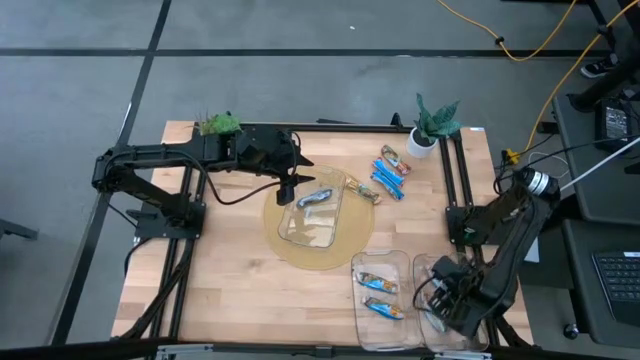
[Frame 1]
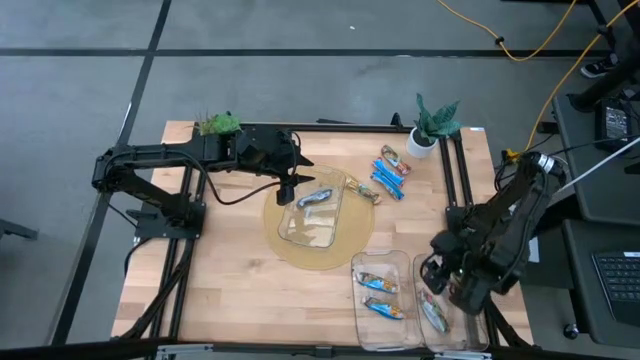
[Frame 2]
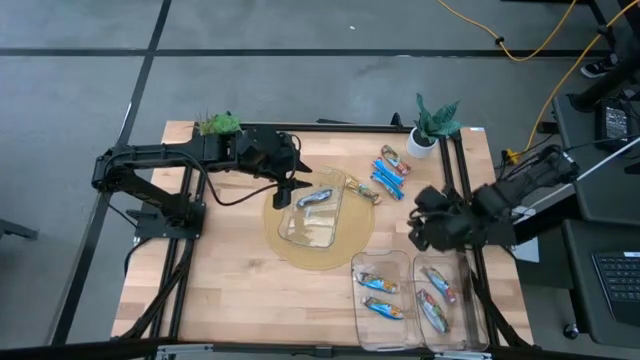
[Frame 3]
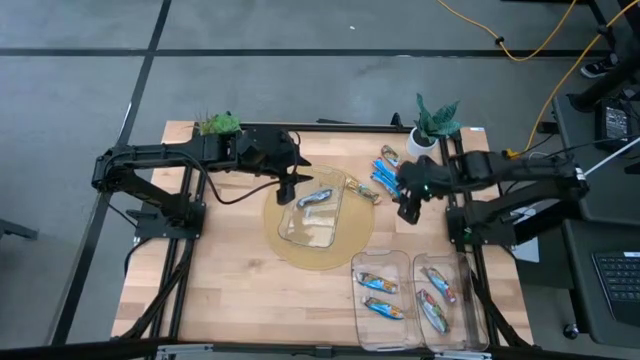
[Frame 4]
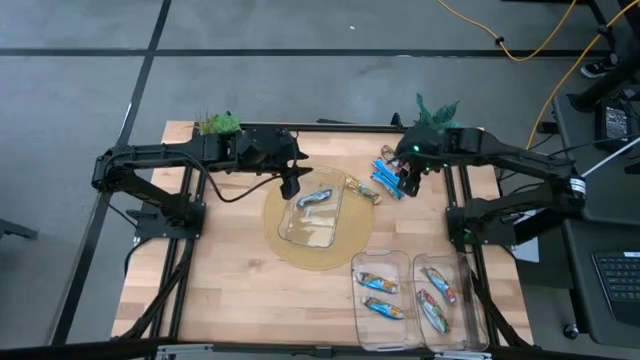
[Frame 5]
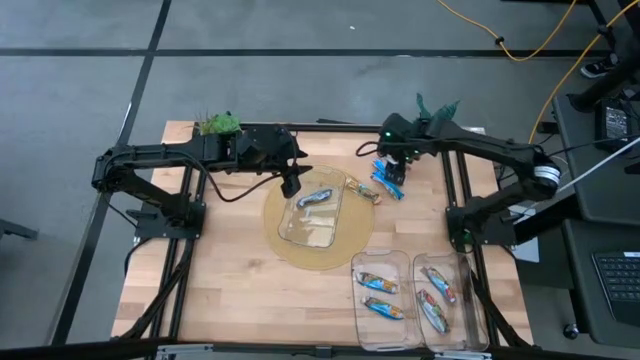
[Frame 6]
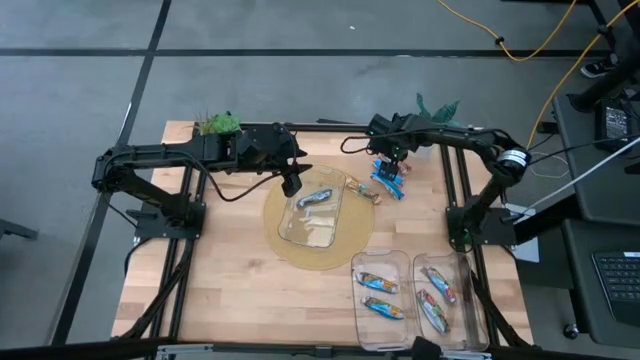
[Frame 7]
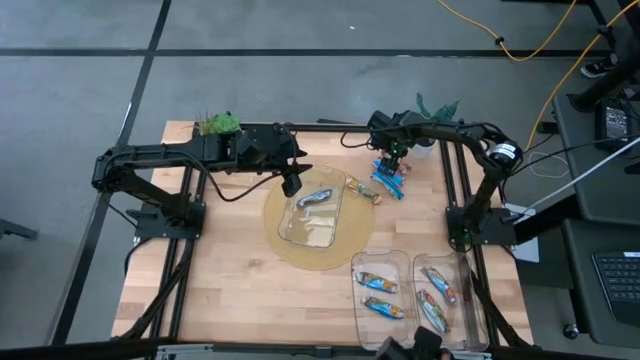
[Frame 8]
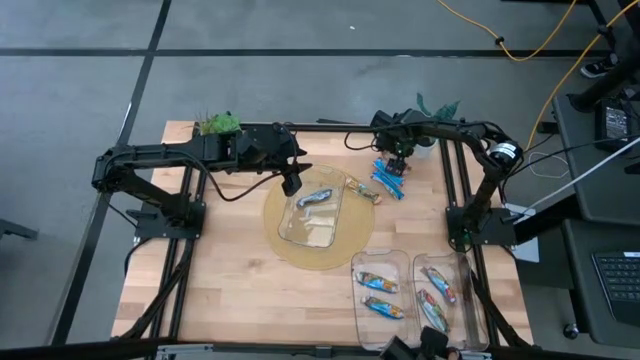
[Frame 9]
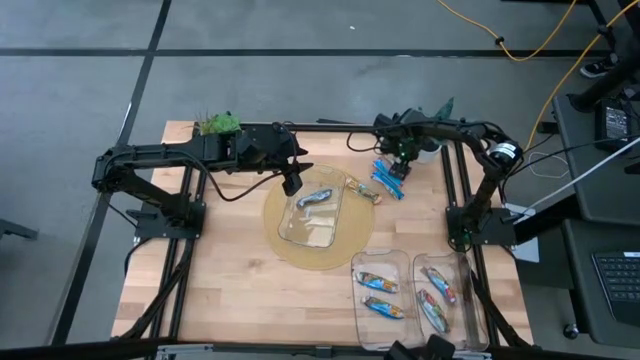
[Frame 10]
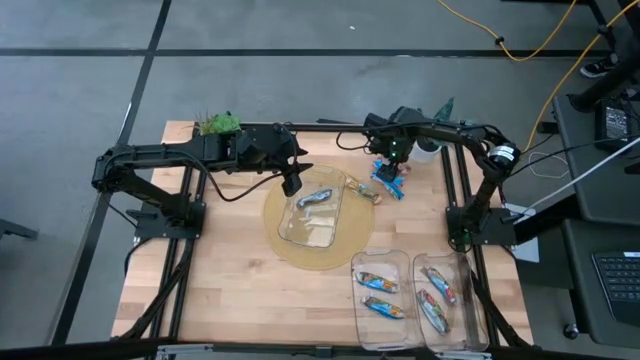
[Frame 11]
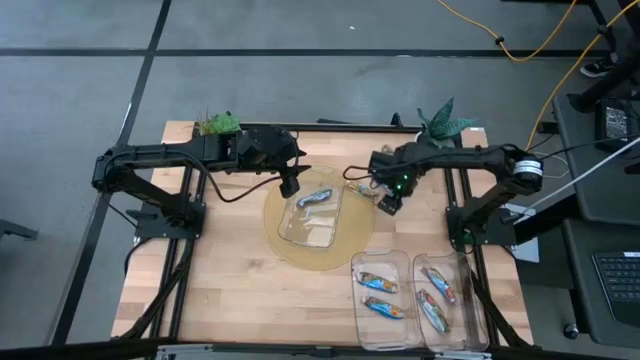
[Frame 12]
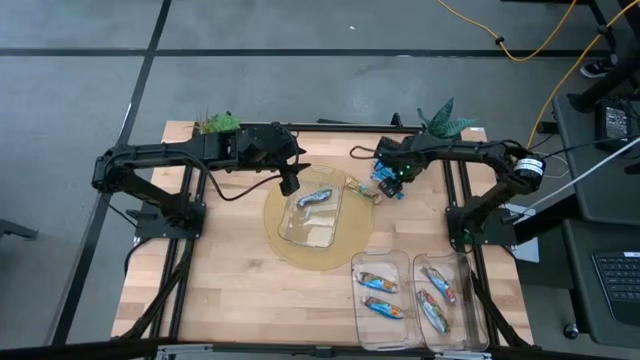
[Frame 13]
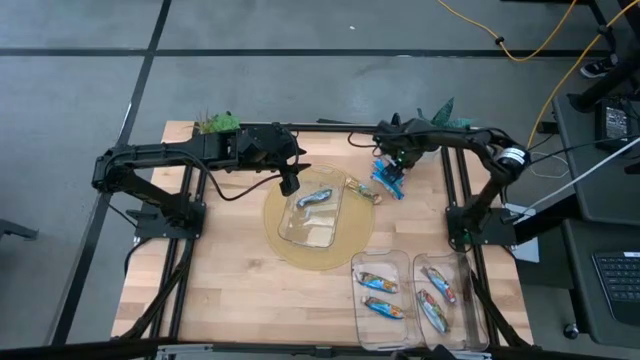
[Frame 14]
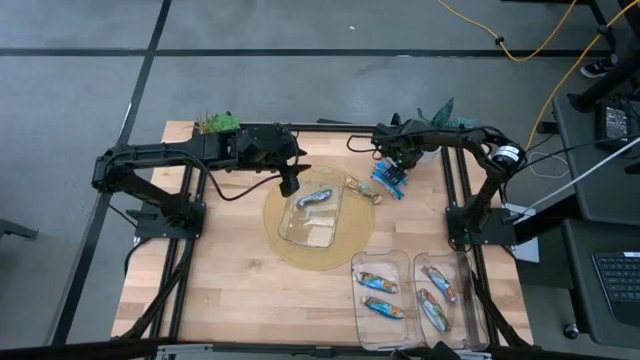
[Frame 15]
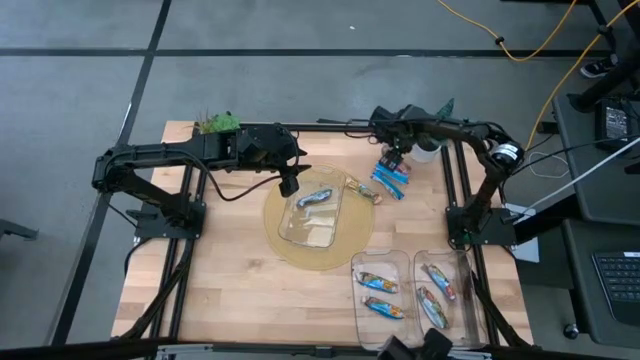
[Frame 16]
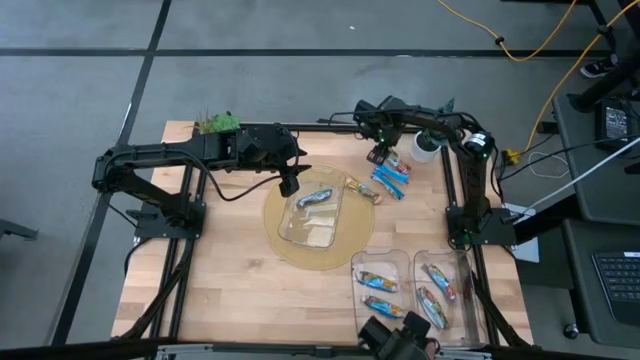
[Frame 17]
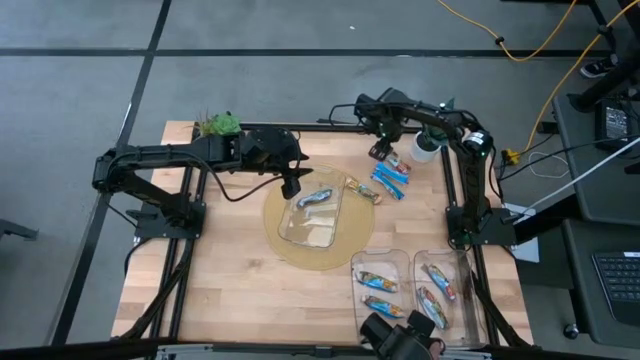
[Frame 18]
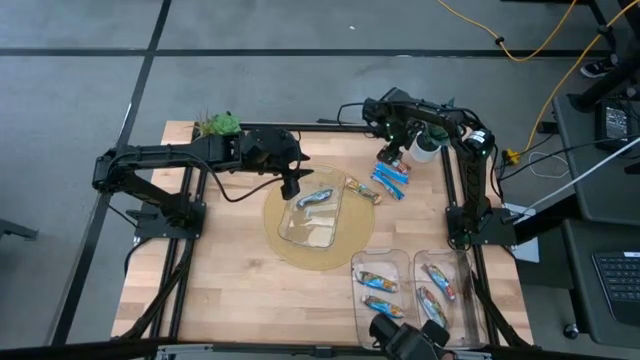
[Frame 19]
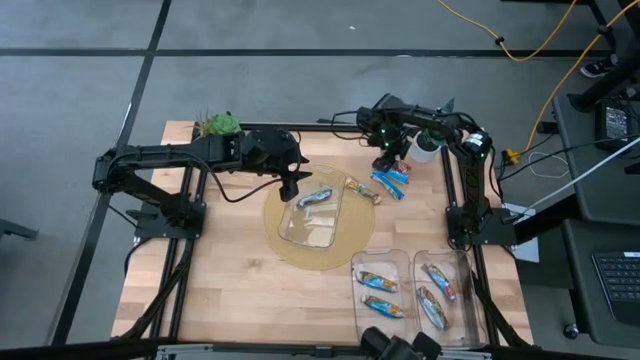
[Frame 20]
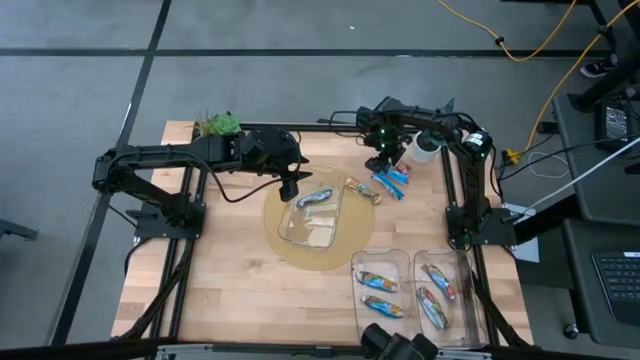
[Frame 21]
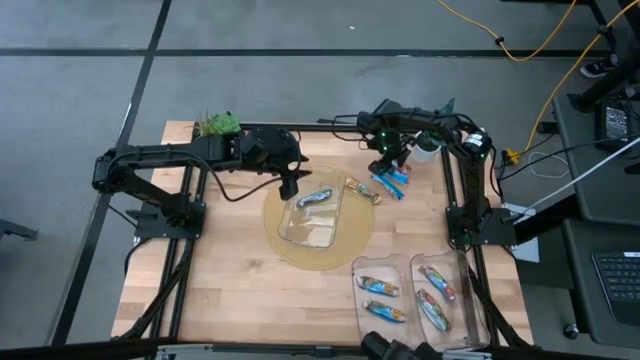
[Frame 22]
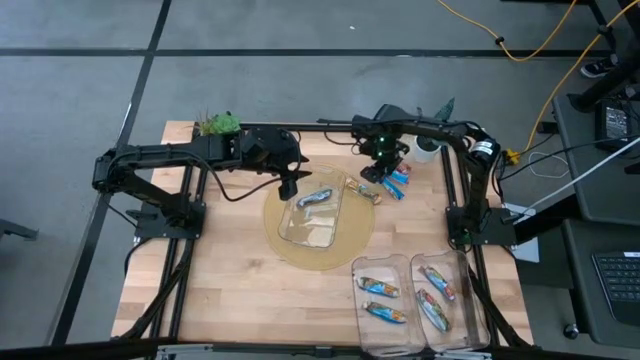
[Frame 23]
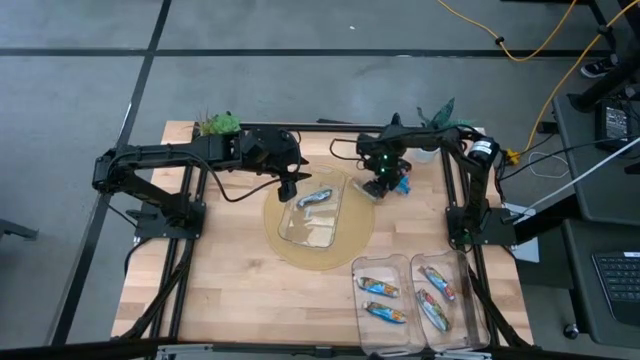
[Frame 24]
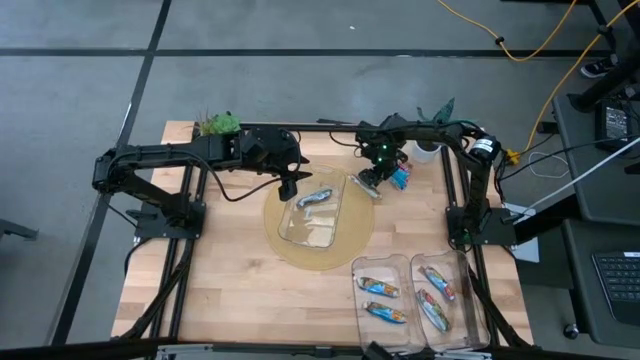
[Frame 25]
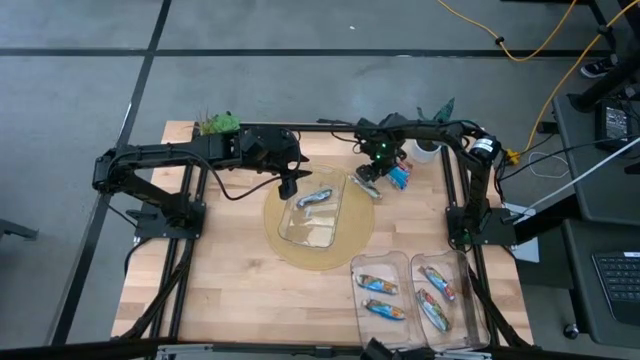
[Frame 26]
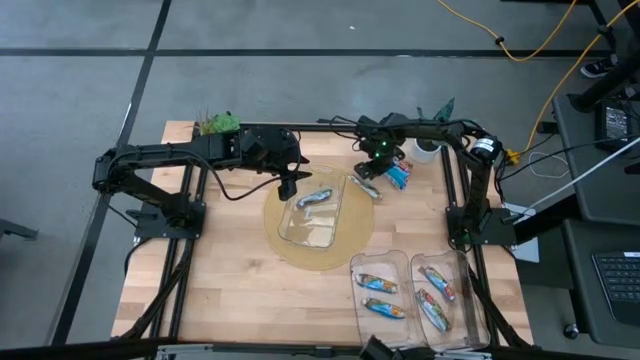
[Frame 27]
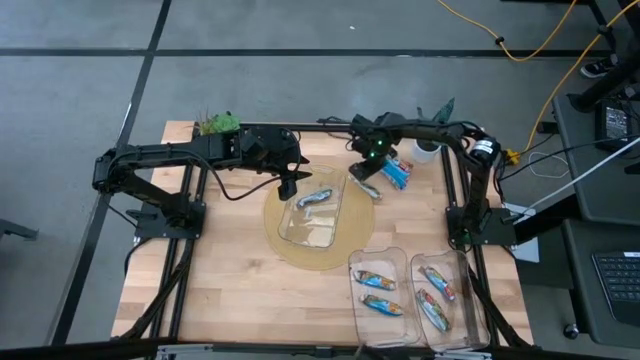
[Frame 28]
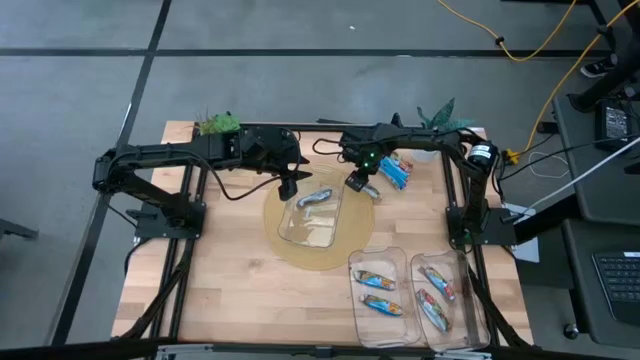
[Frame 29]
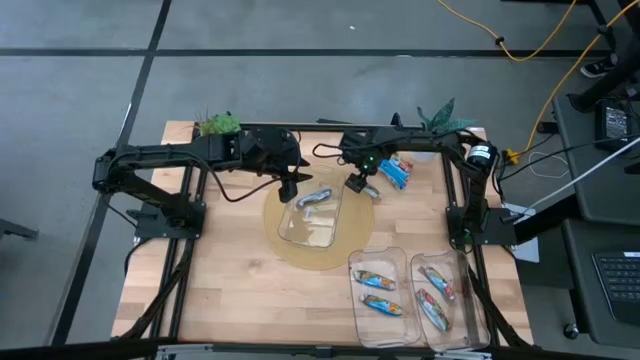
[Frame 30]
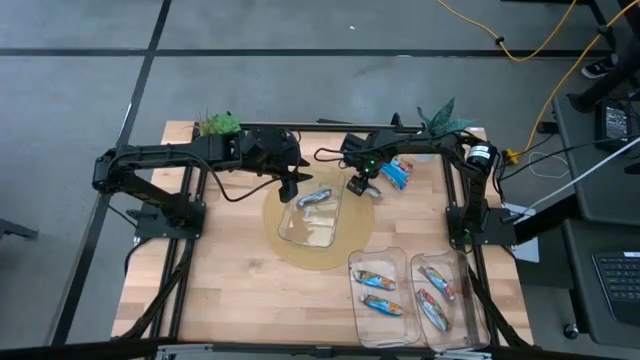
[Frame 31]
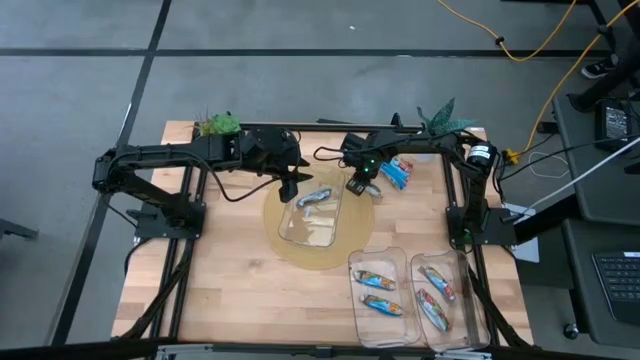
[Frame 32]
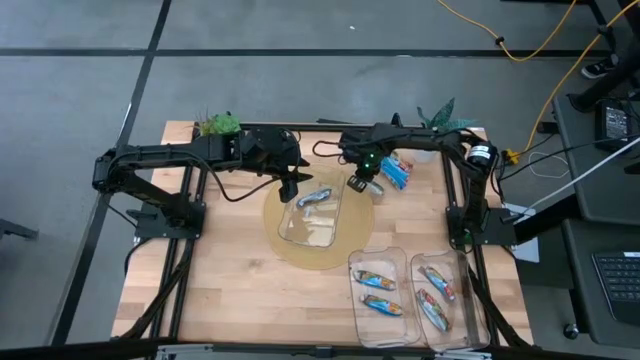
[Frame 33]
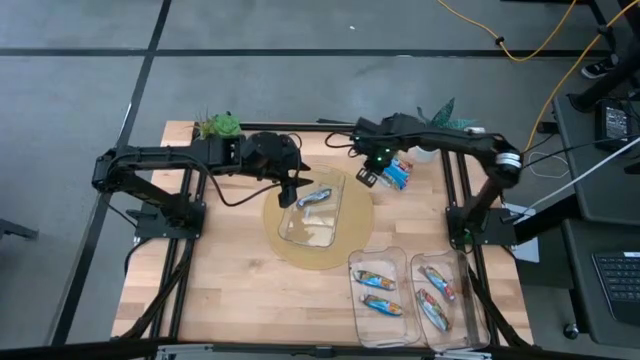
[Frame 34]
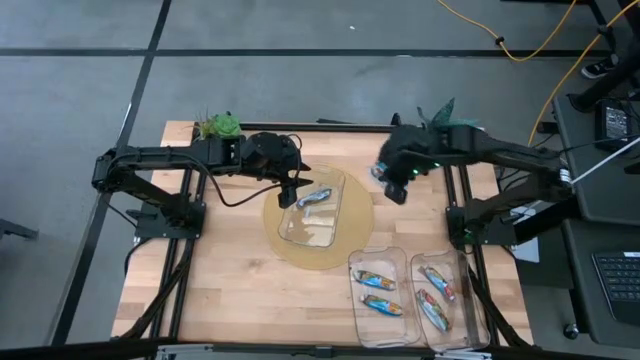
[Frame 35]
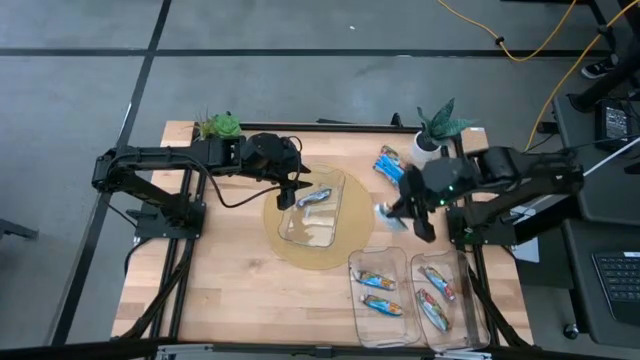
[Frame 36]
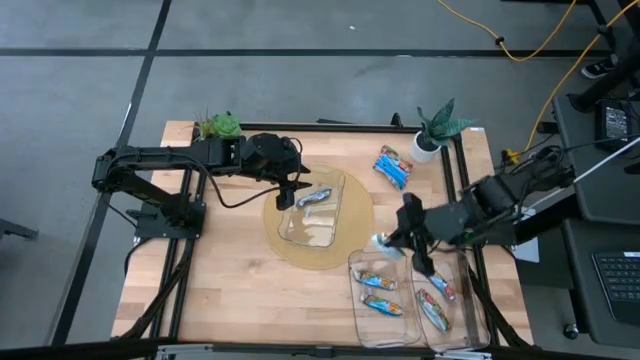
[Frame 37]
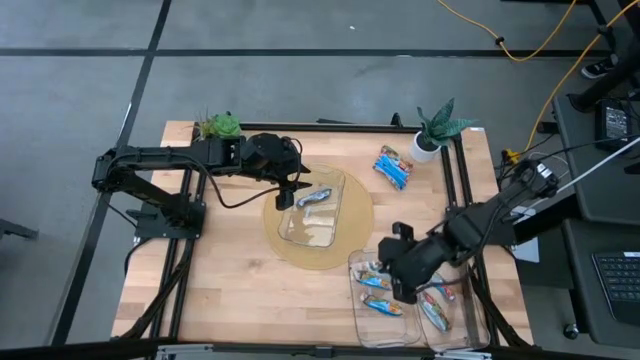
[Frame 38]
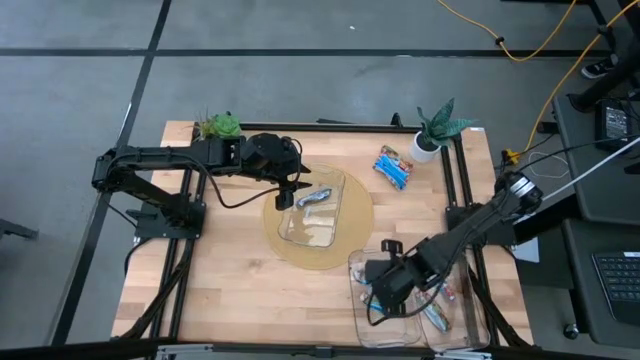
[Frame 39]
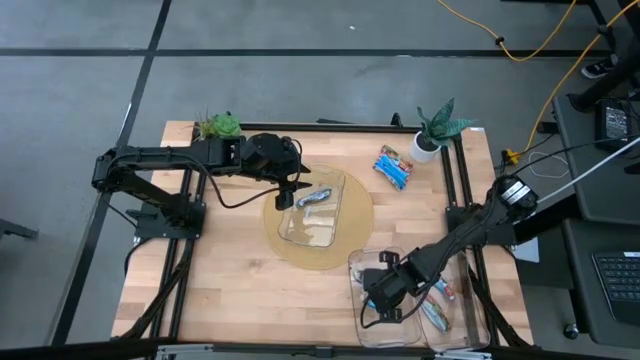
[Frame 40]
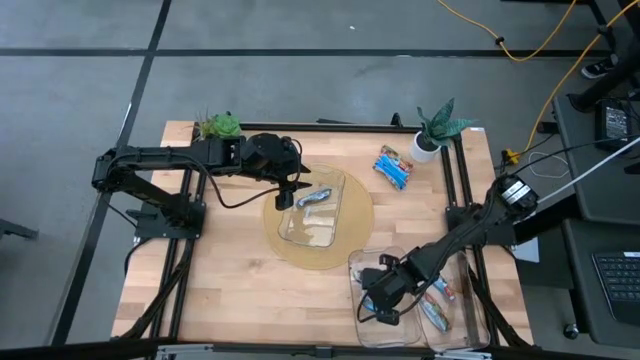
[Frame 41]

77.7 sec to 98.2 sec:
Task: Pick and place Granola Bars by type
Put the yellow granola bar pack into the bottom left transparent bin
